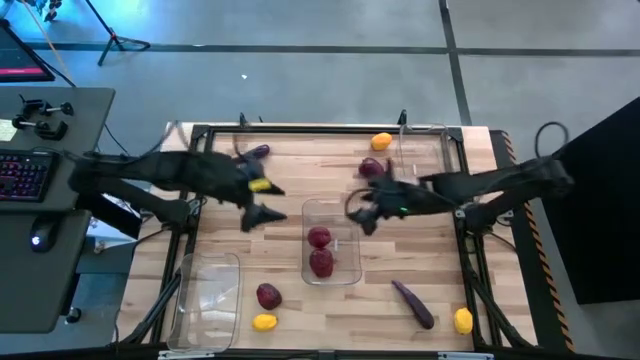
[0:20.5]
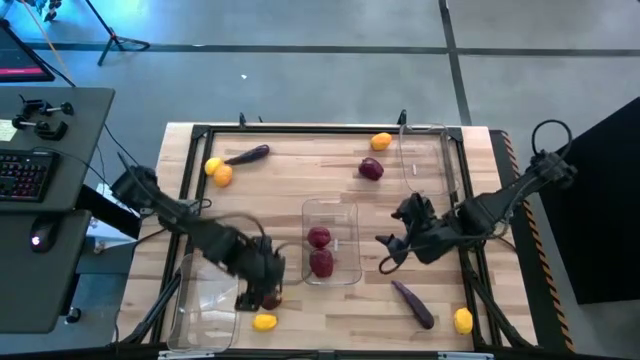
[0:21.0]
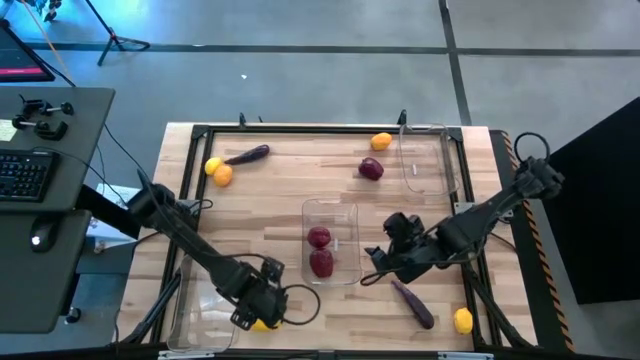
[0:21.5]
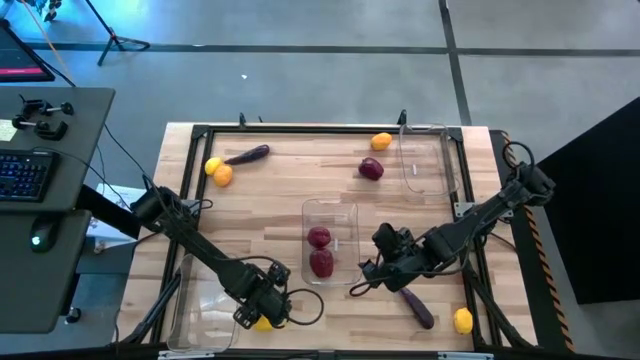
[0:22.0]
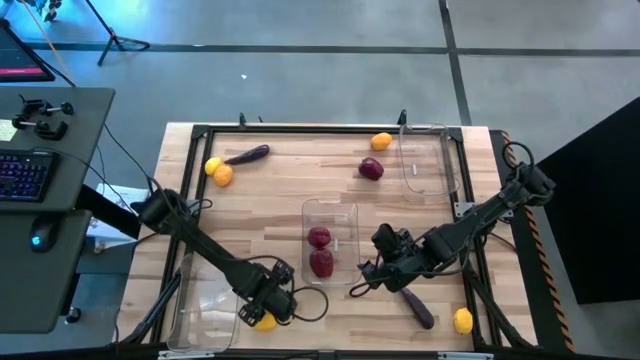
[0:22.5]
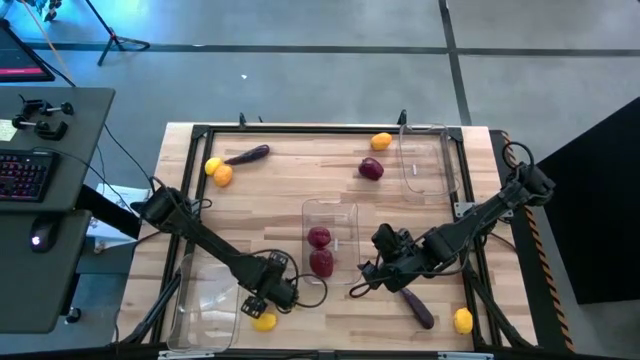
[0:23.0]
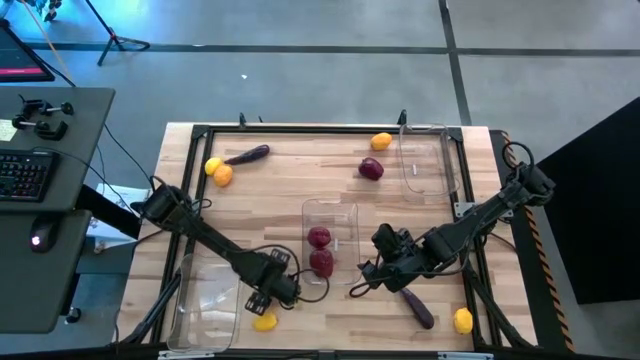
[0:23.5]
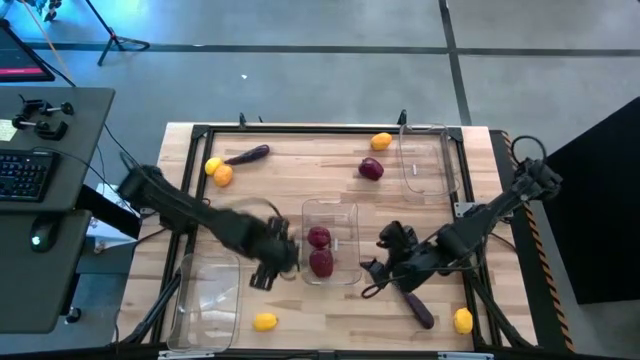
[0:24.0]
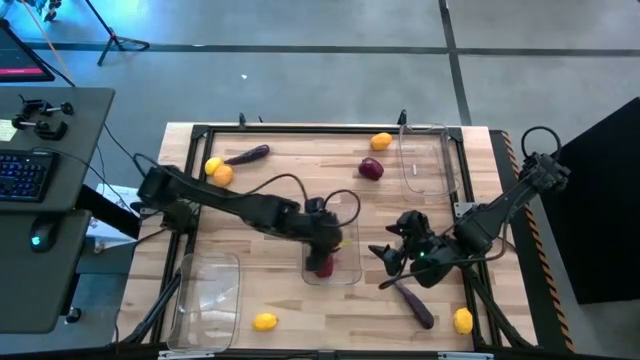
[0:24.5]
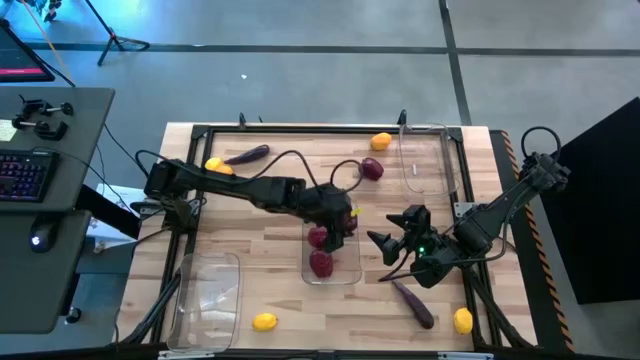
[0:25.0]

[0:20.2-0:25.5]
Task: Sort produce into baskets
Put the red apple into the middle transparent bin

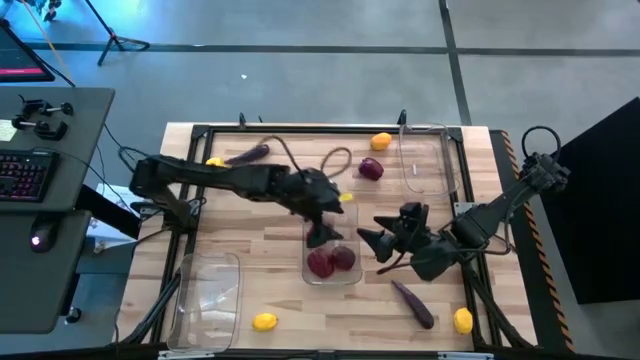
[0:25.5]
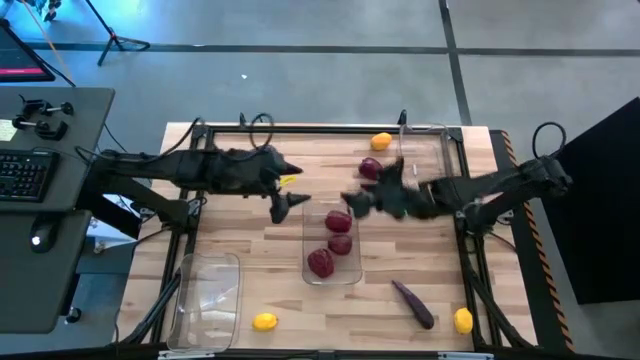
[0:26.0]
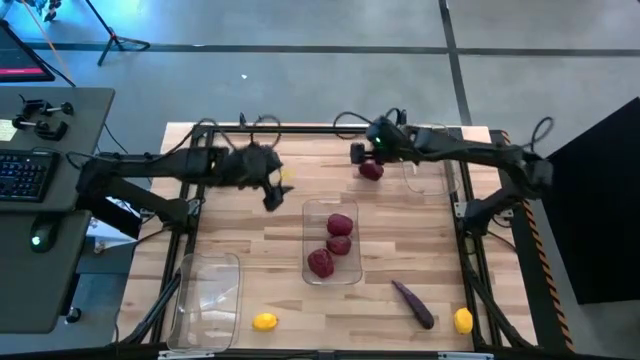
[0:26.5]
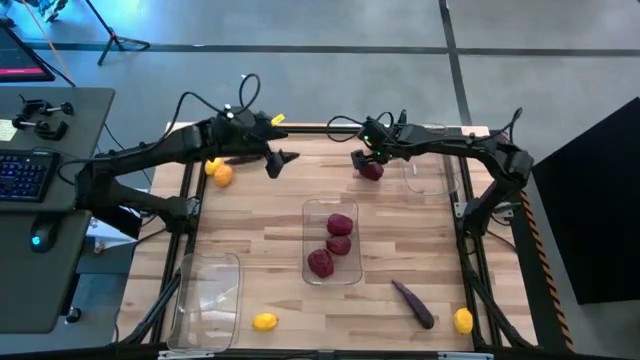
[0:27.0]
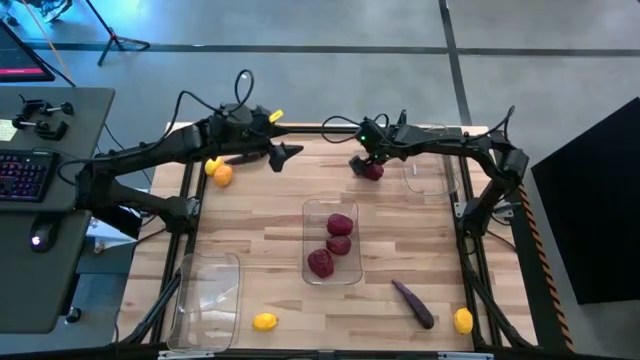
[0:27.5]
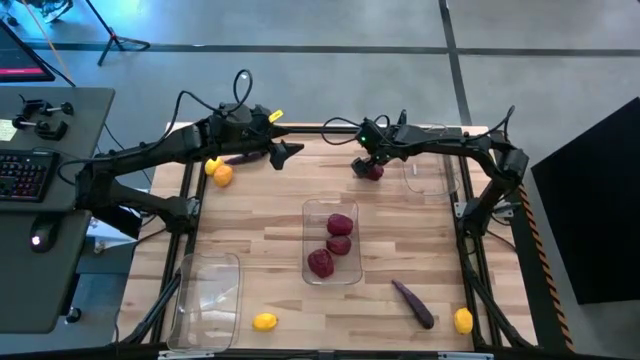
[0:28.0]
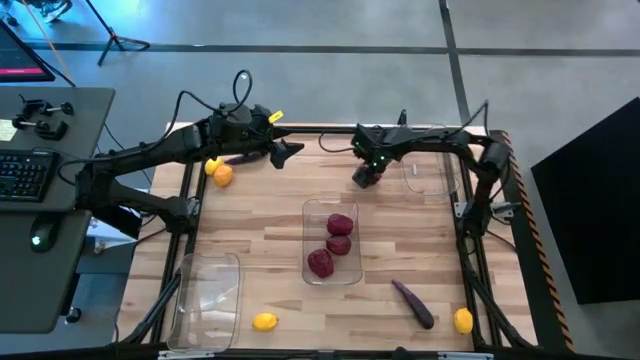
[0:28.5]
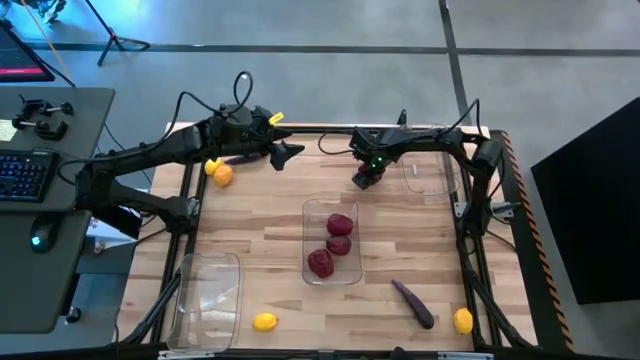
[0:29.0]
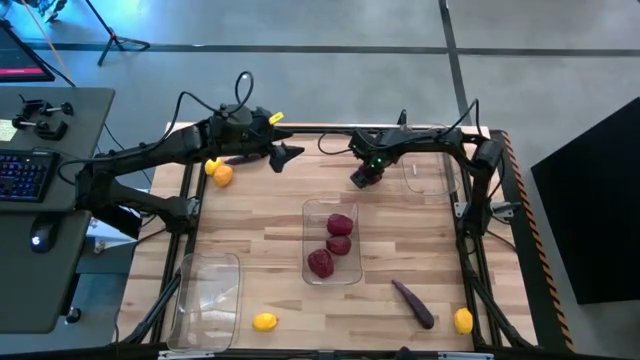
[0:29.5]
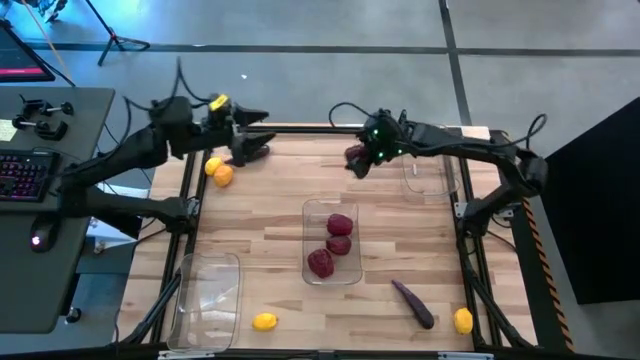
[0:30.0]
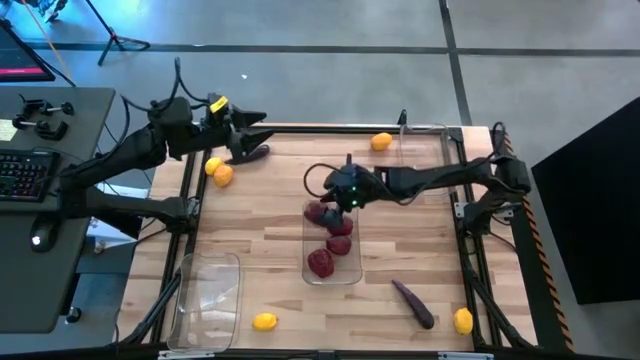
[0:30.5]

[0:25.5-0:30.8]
Put the red apple into the middle transparent bin

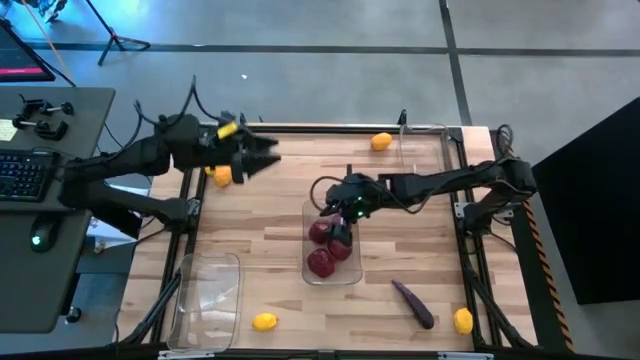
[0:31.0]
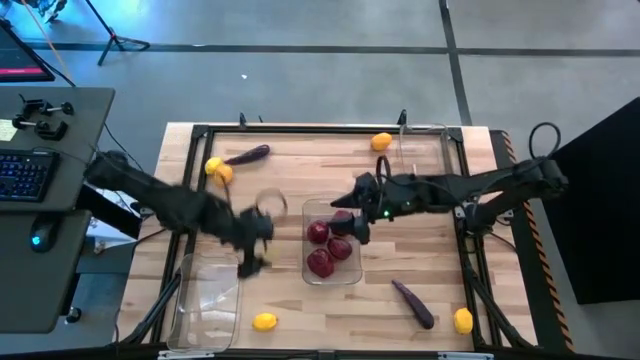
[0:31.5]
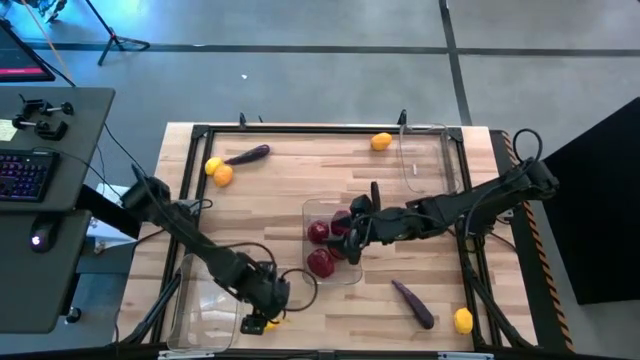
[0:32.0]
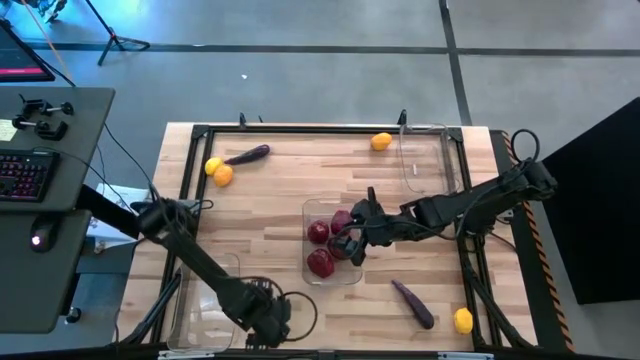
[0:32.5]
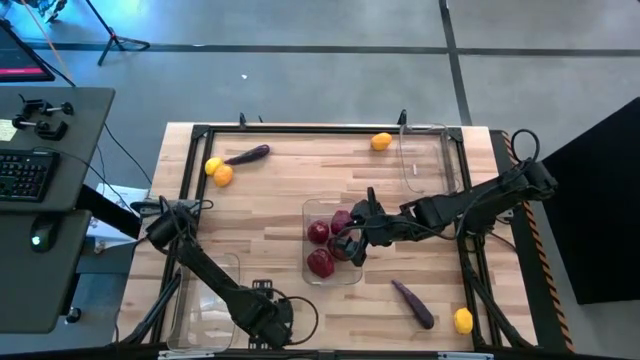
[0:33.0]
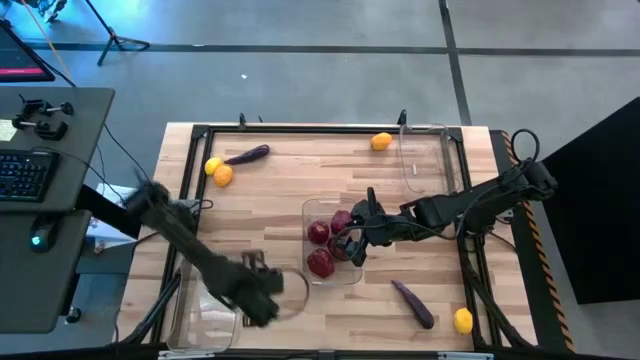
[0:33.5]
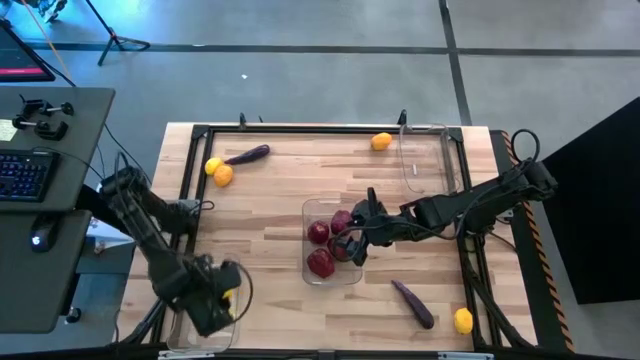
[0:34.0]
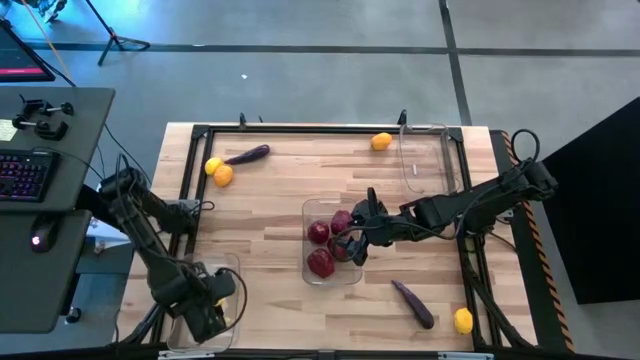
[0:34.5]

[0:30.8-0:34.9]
Put the yellow lemon into the bottom left transparent bin

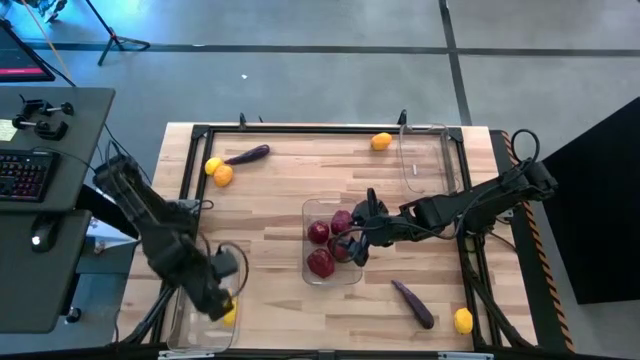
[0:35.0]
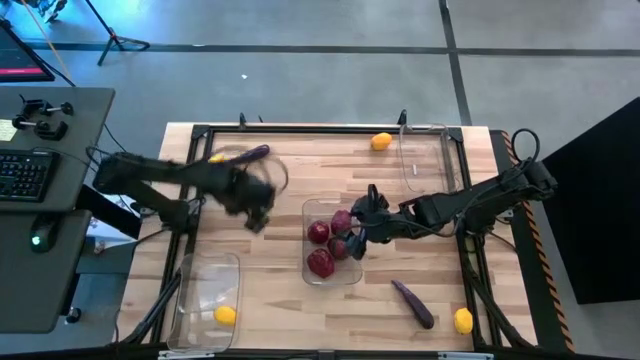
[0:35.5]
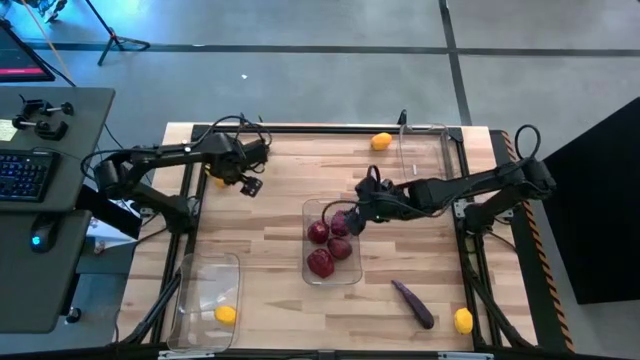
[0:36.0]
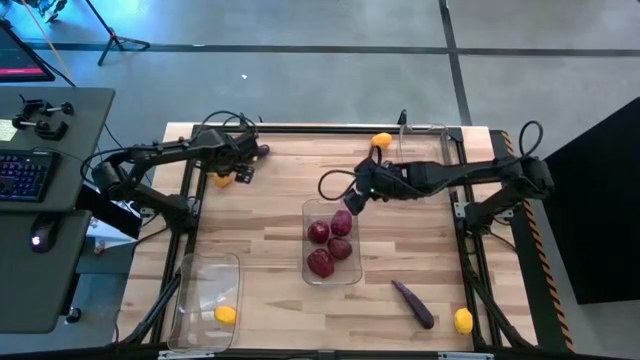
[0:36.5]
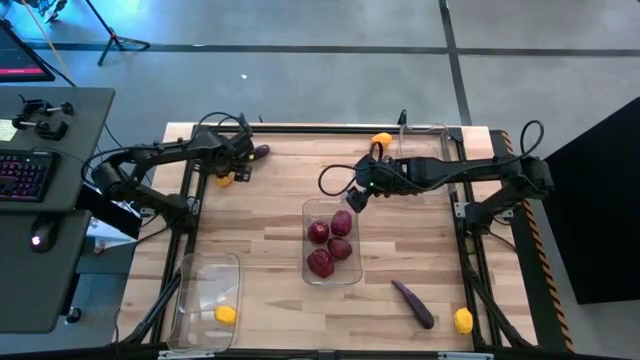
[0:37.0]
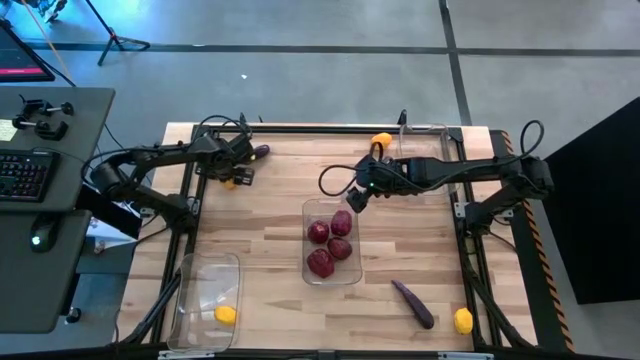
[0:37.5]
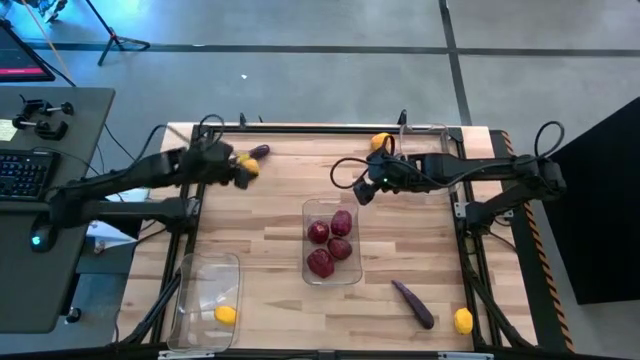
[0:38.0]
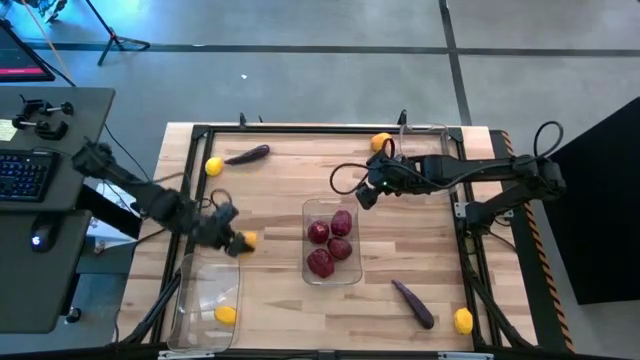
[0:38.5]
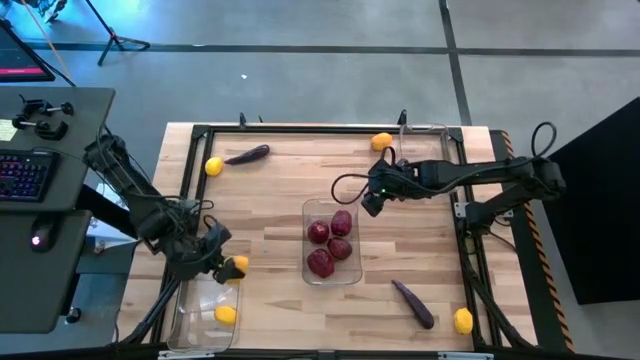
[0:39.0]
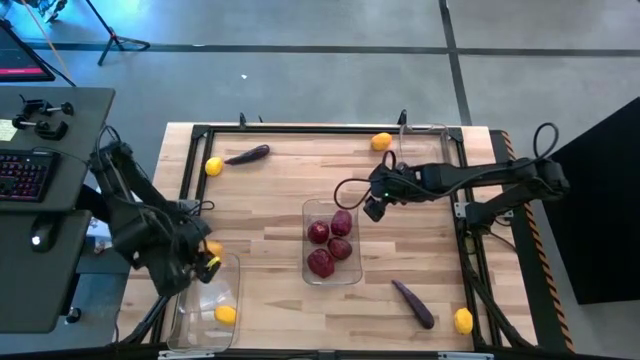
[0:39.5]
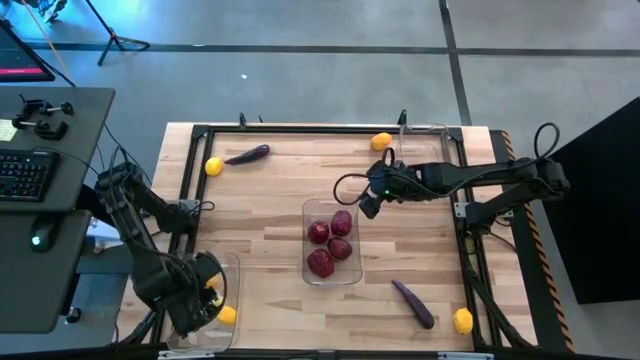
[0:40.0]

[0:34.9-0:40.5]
Put the yellow lemon into the bottom left transparent bin

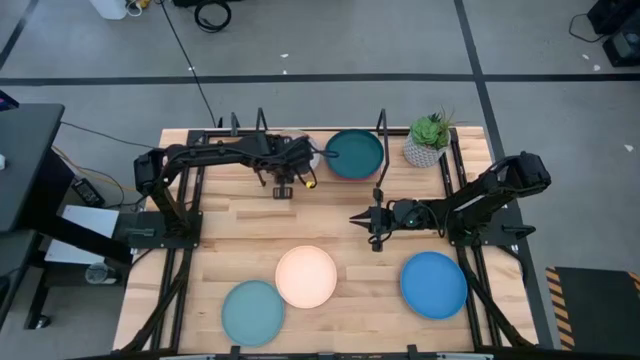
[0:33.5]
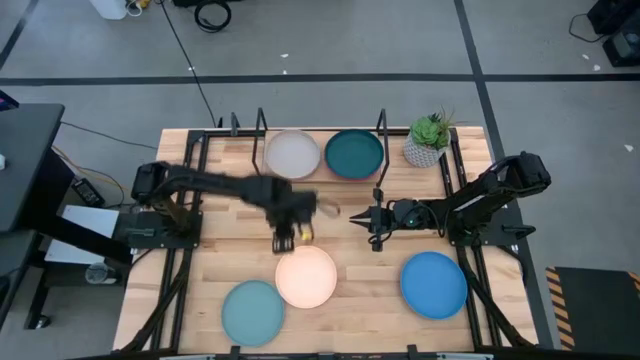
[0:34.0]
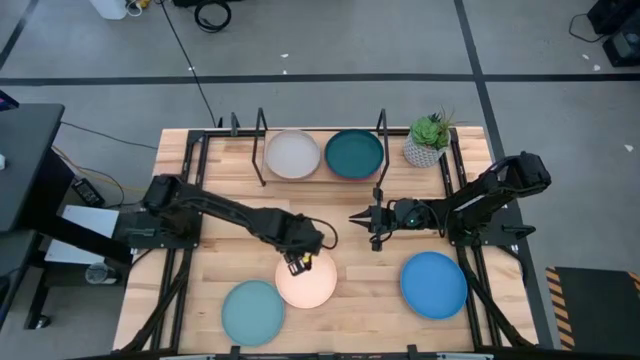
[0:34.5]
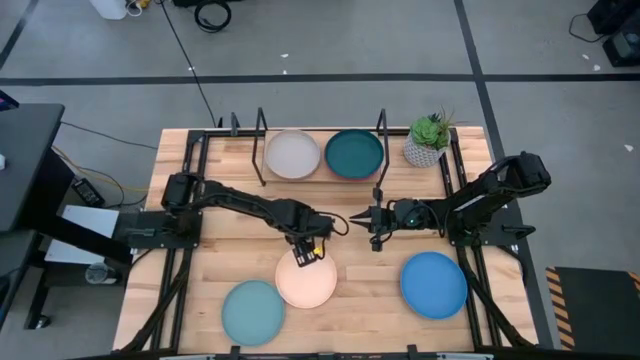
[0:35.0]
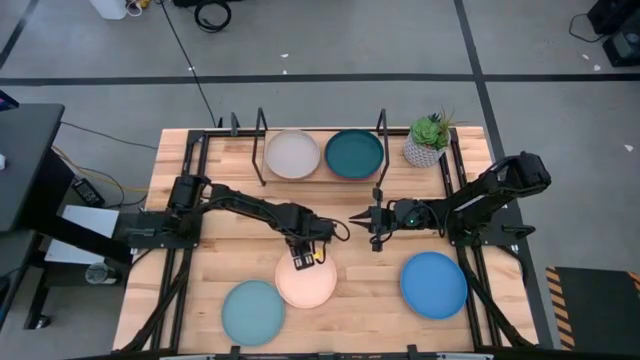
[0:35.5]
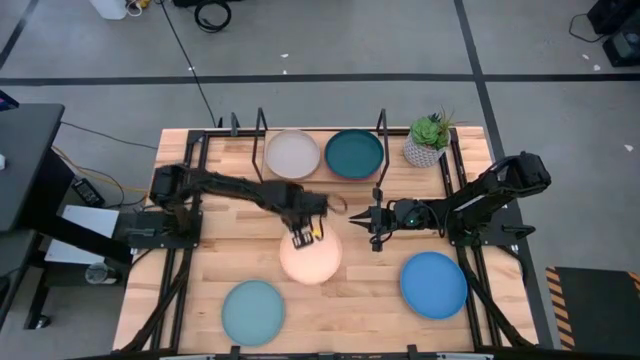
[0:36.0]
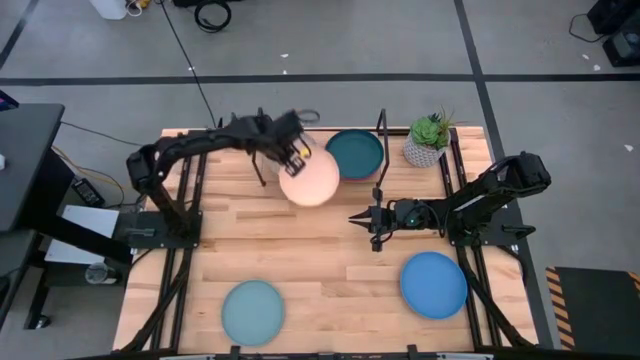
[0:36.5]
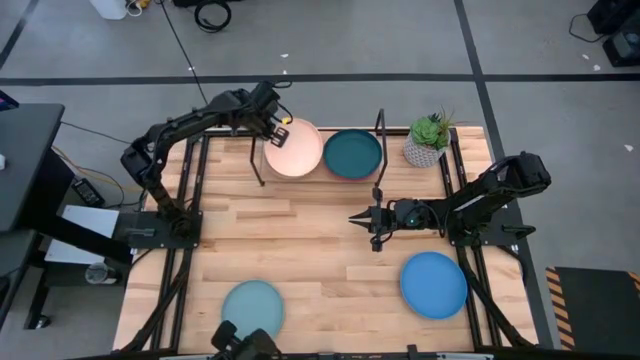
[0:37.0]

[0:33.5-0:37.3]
Task: Place and stack plates onto a shelf
Stack the white plate on top of the gray plate on the shelf
